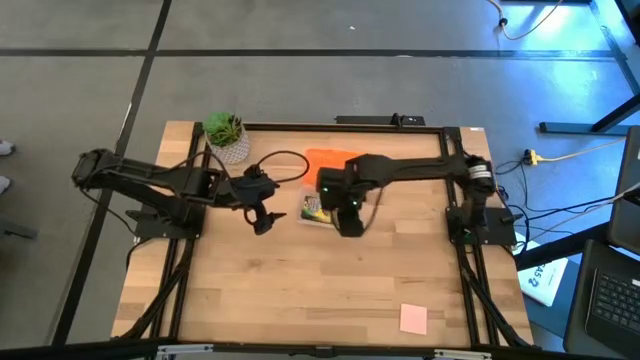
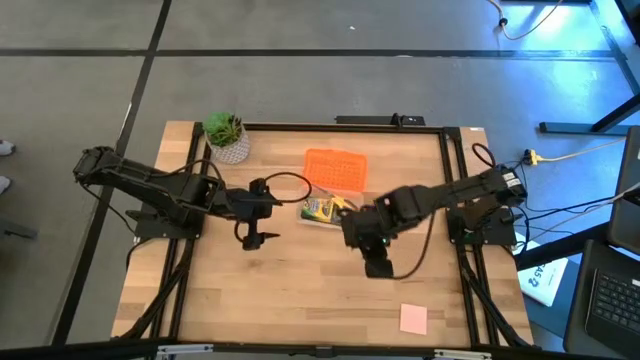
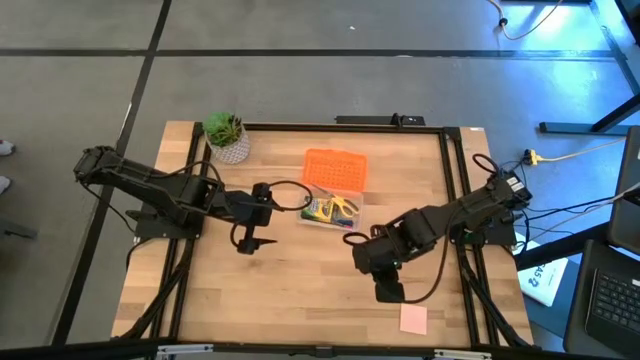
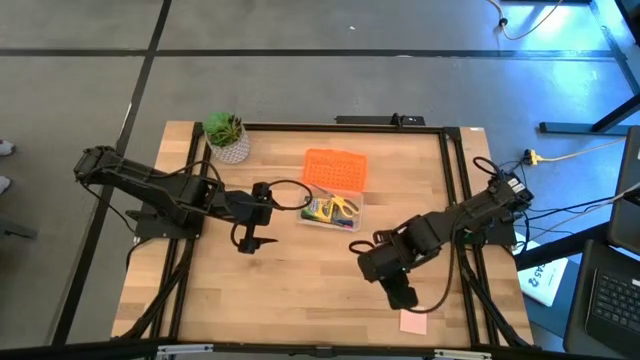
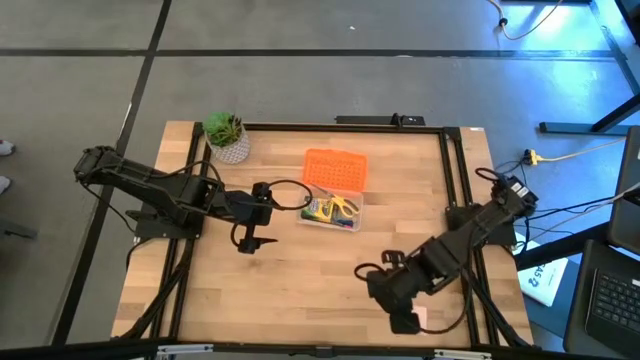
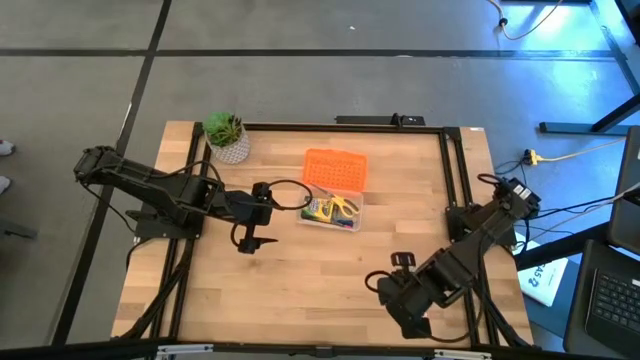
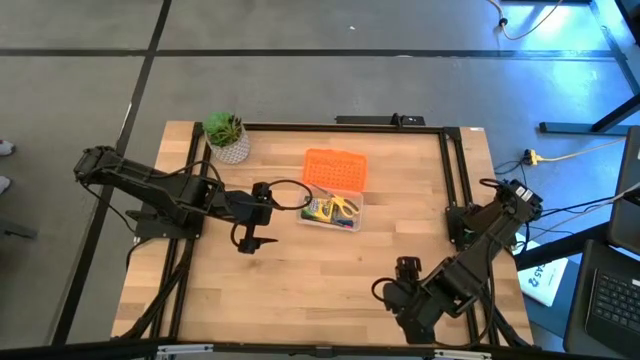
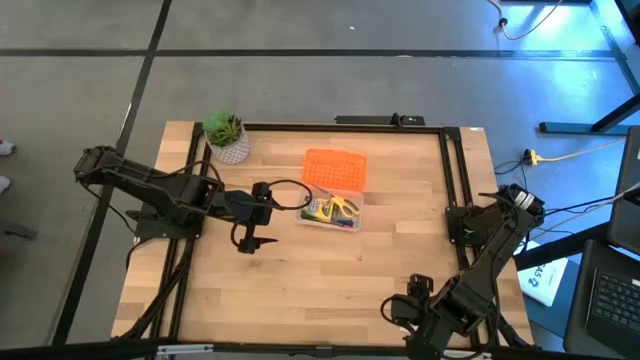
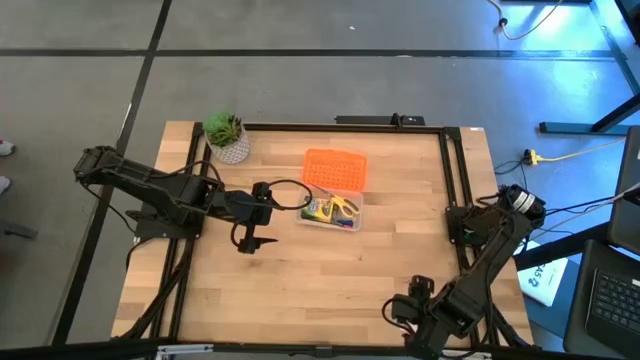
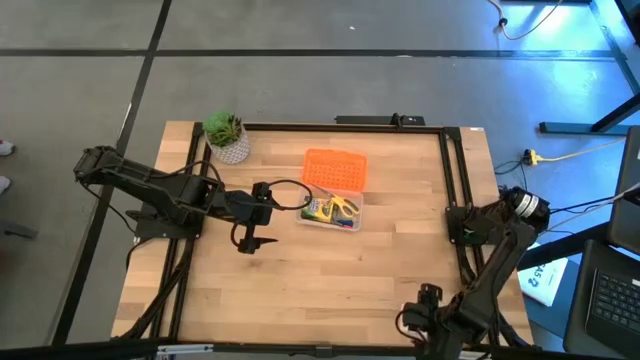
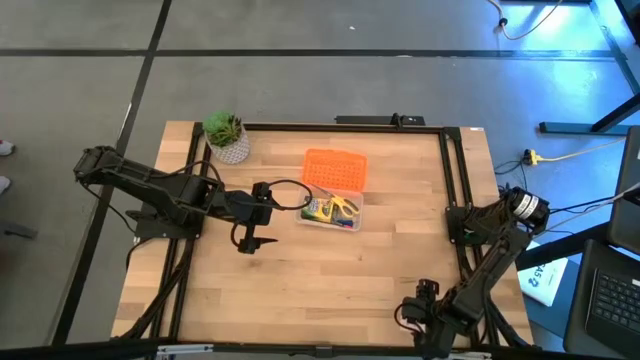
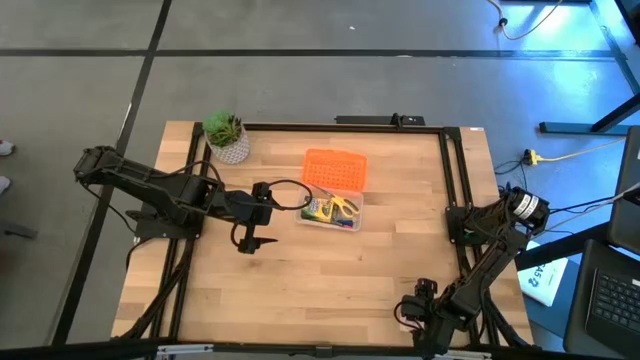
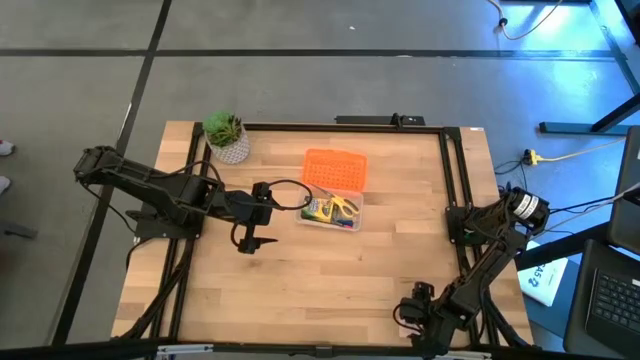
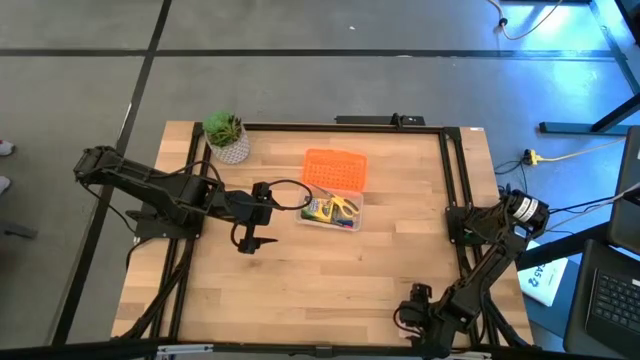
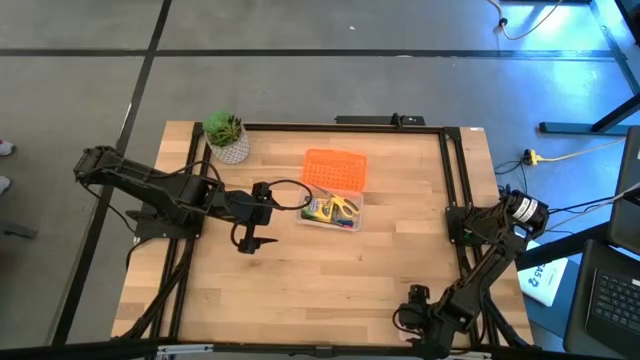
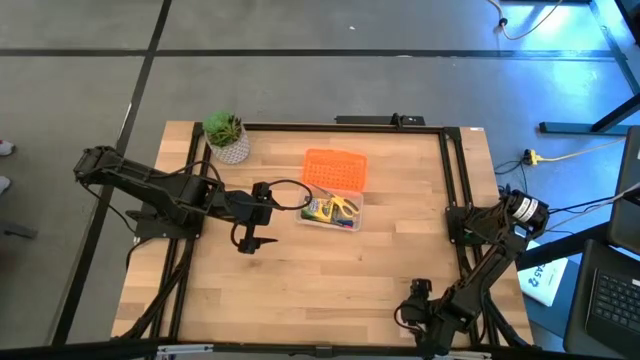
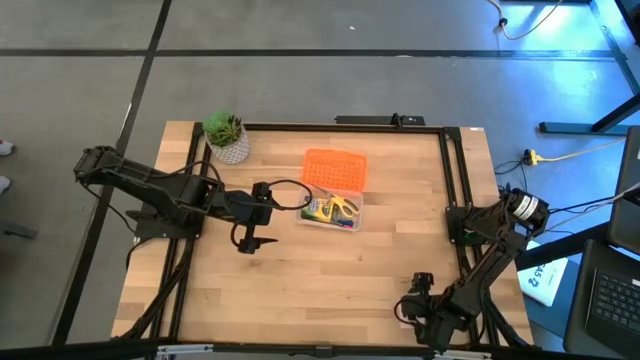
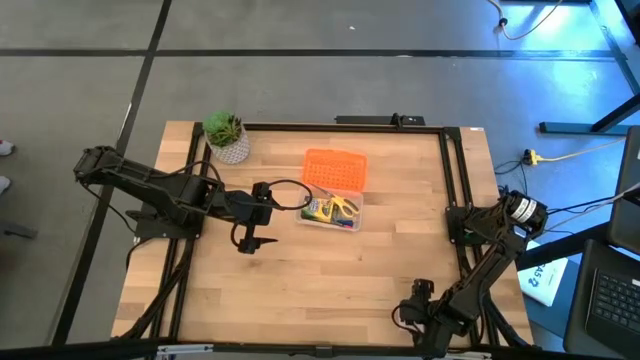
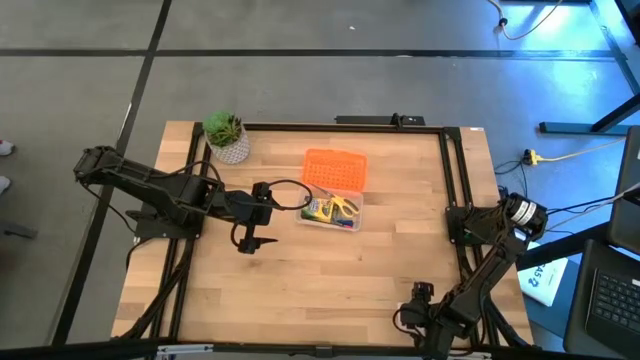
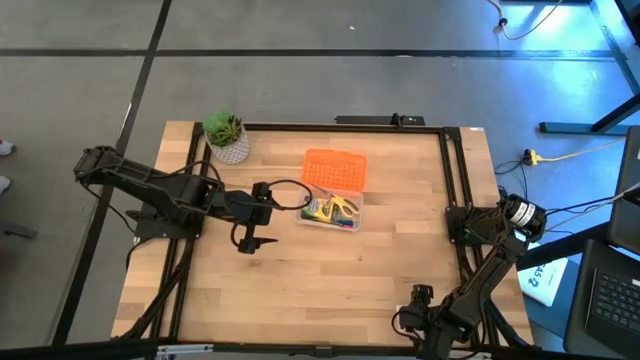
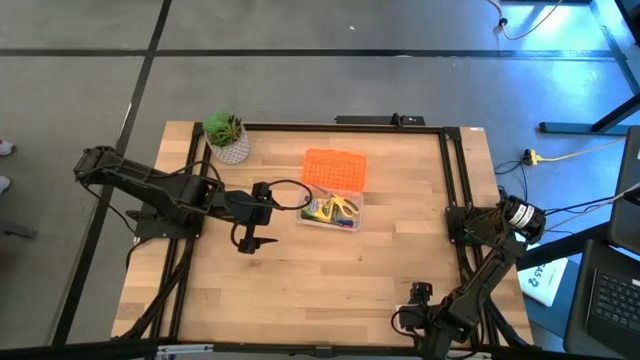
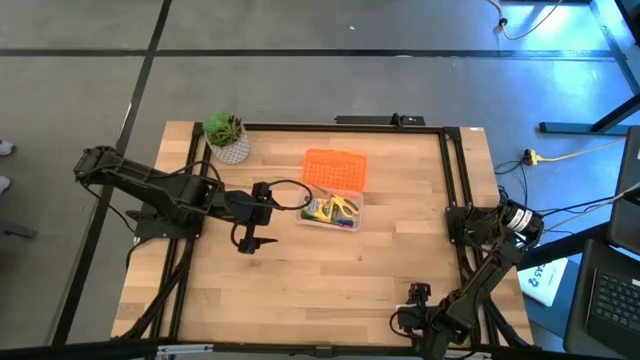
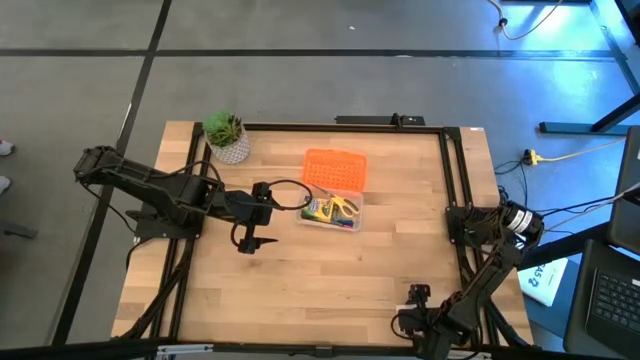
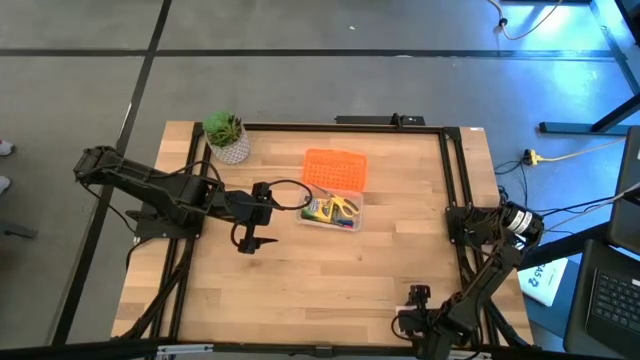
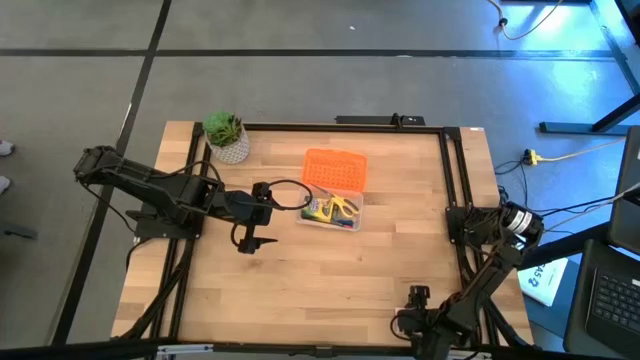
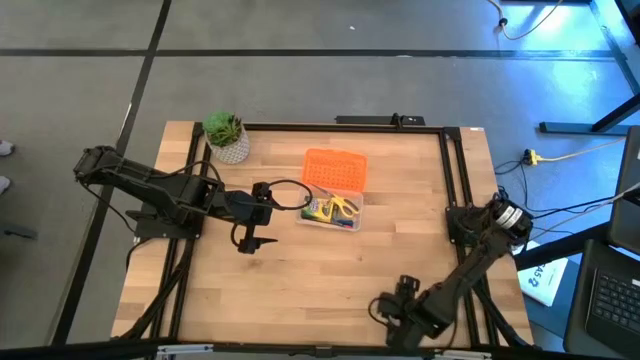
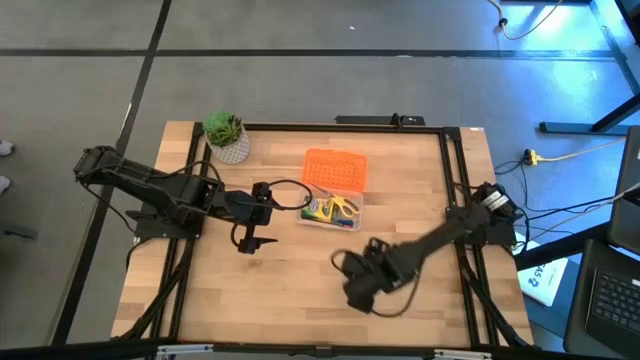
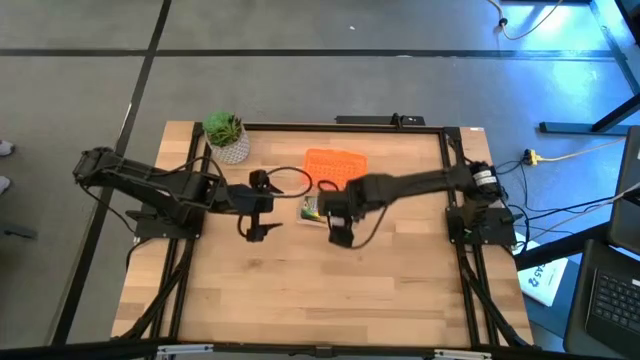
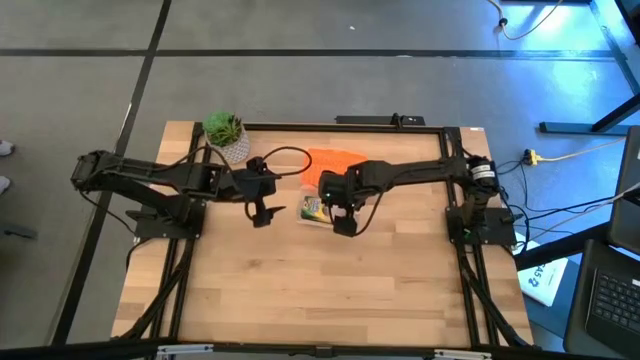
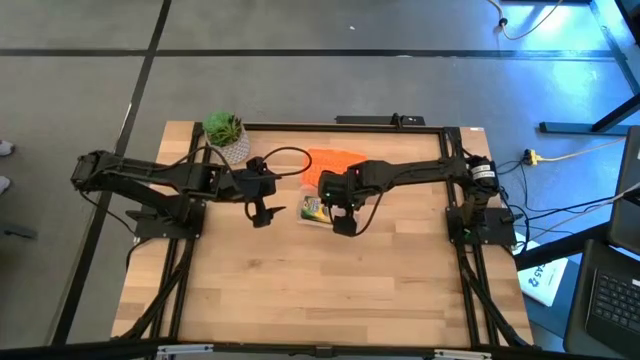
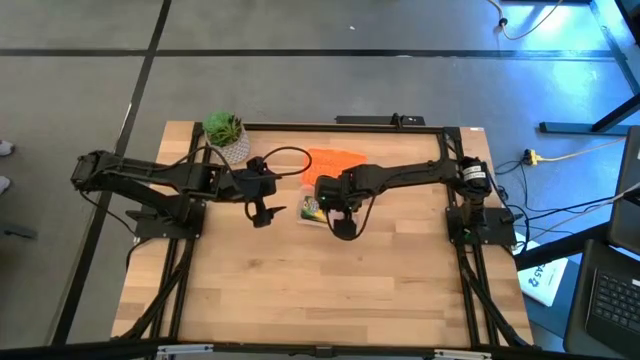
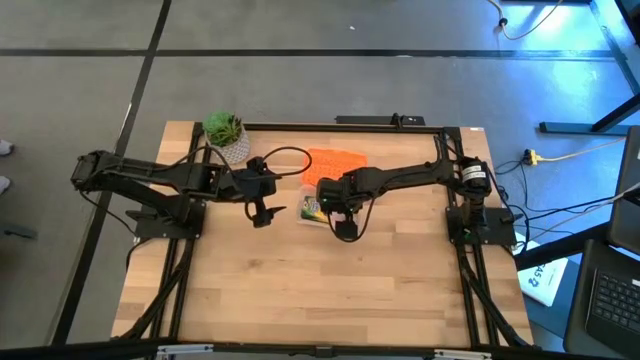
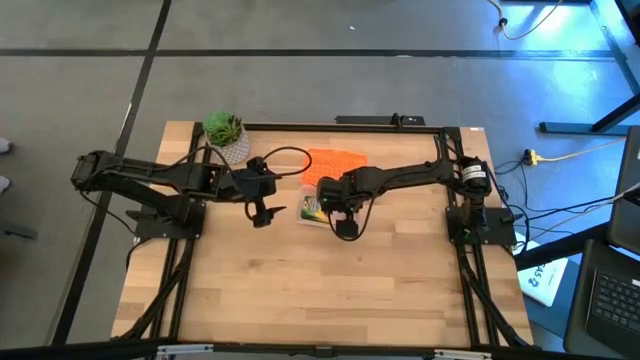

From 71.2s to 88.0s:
Task: Pack school essentials
Put the pink sticky note into the orange supply box

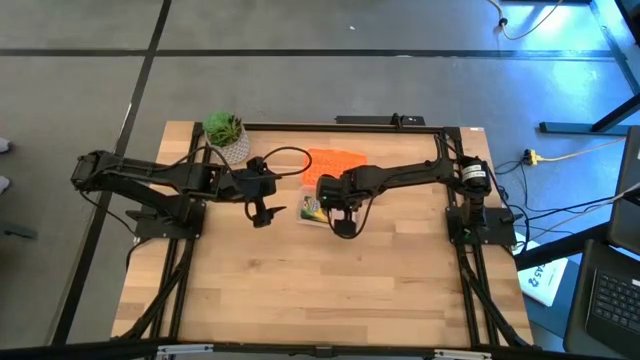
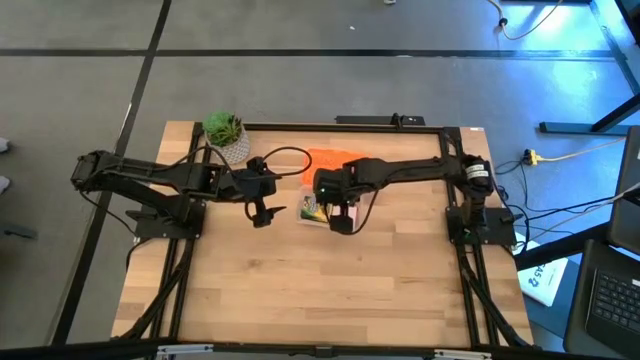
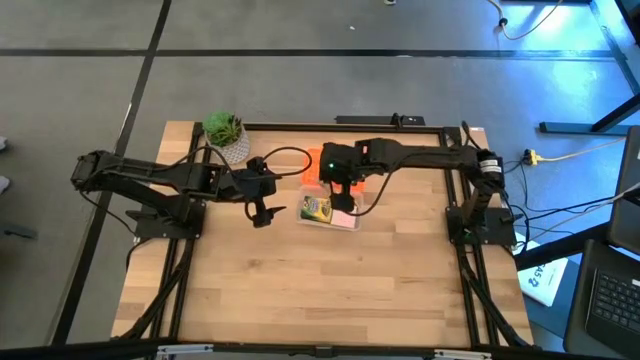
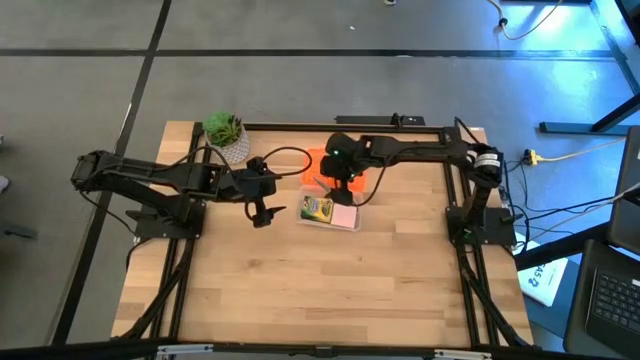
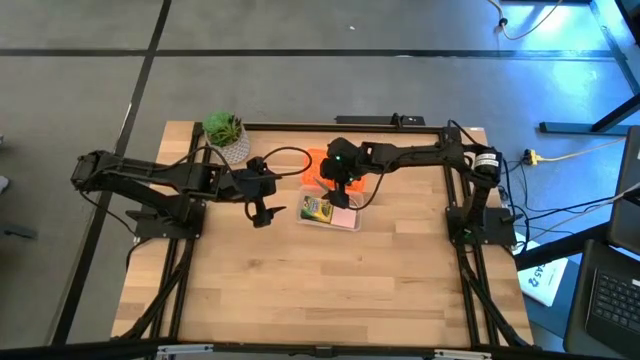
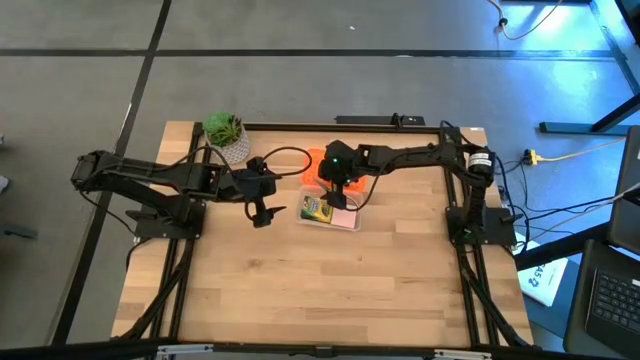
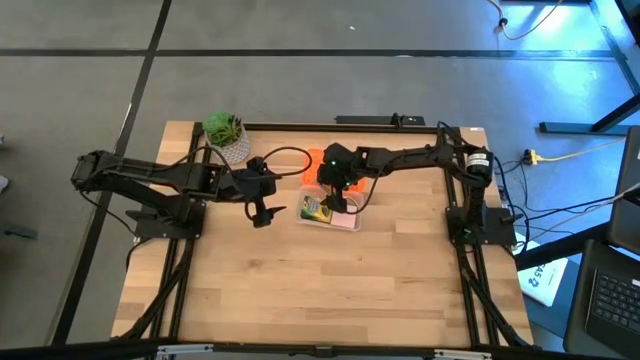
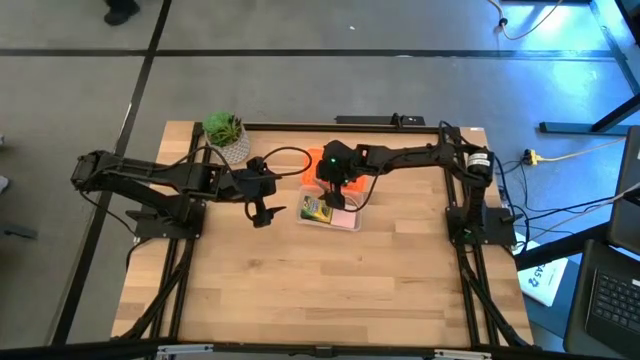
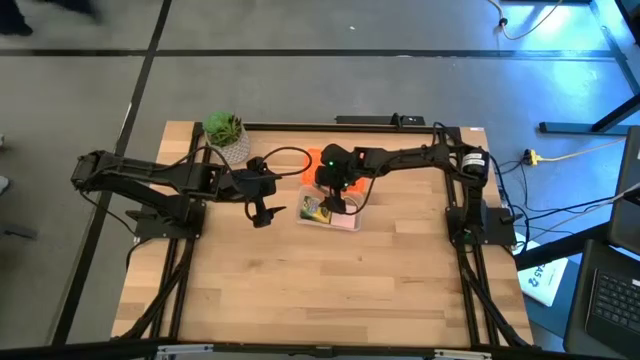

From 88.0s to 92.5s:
Adjust the yellow scissors
